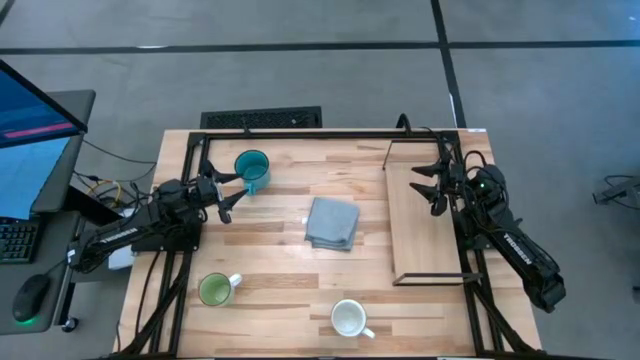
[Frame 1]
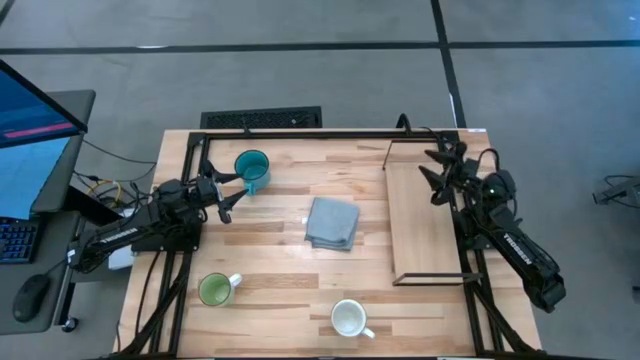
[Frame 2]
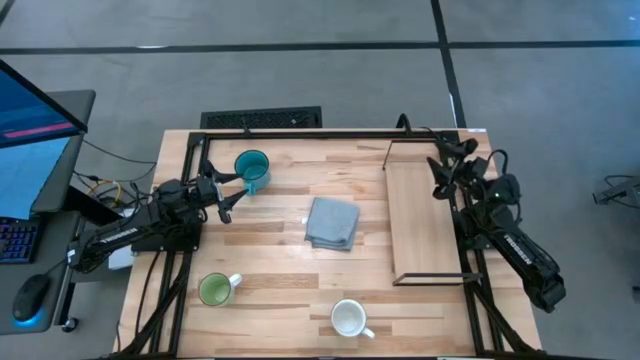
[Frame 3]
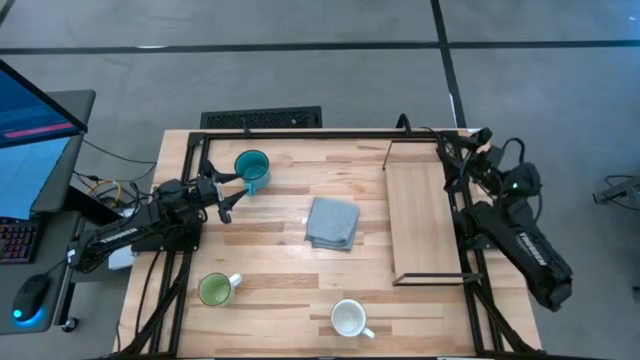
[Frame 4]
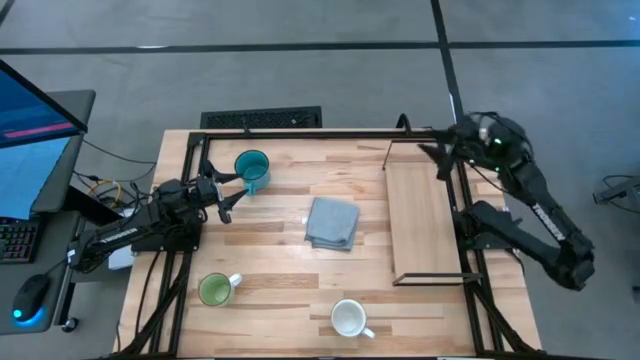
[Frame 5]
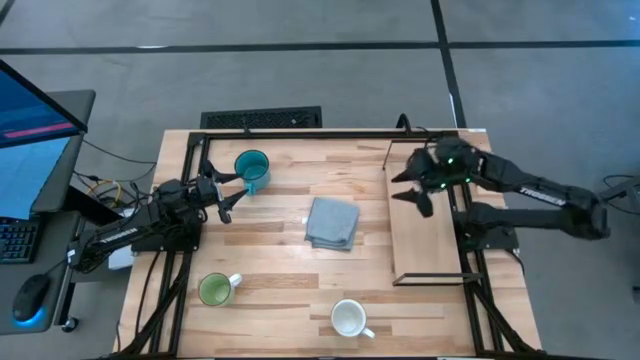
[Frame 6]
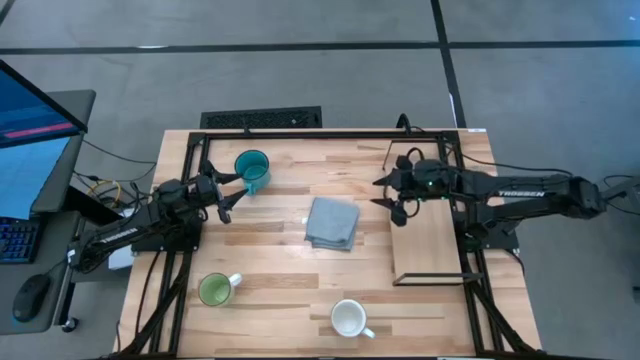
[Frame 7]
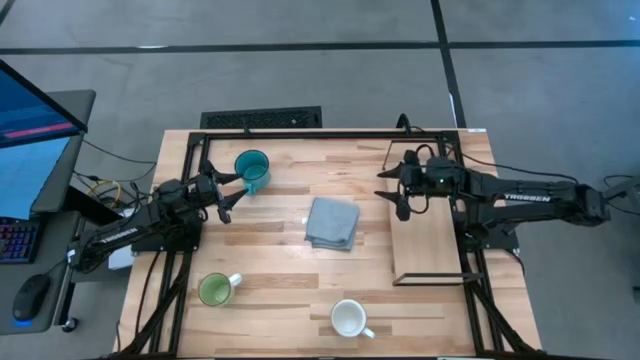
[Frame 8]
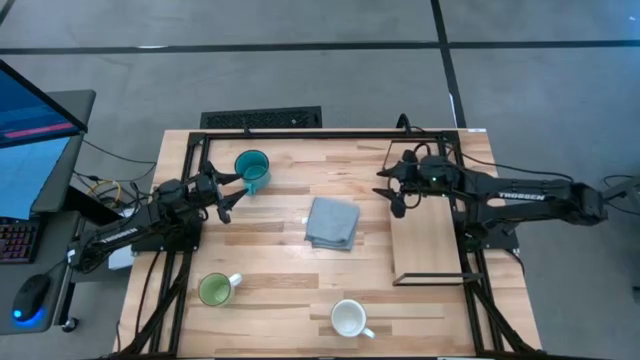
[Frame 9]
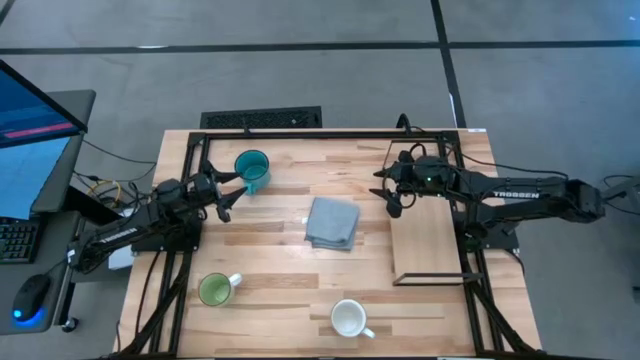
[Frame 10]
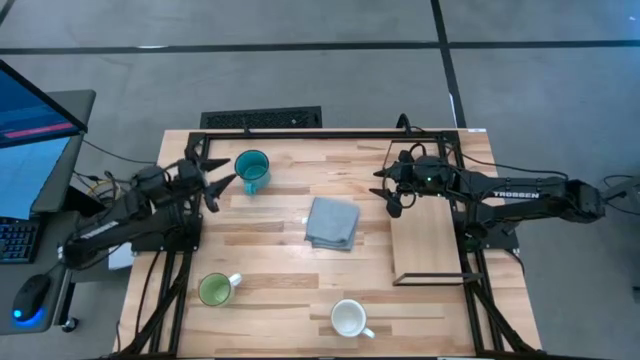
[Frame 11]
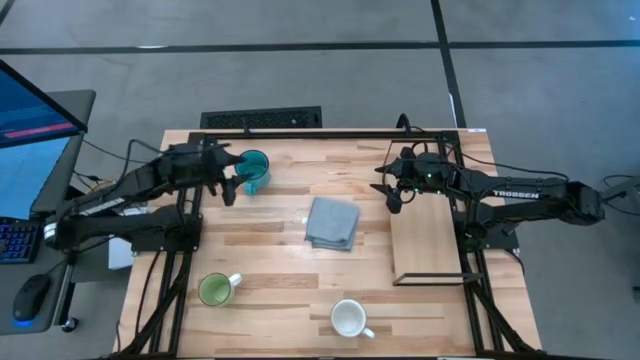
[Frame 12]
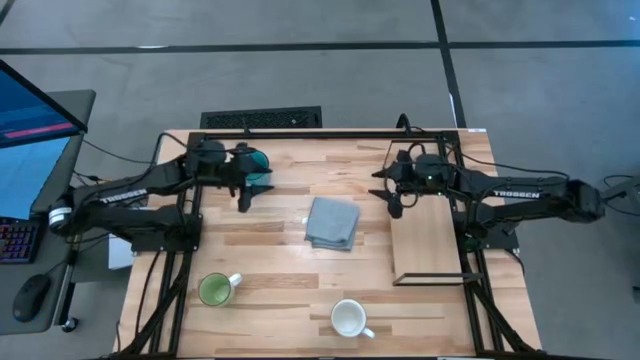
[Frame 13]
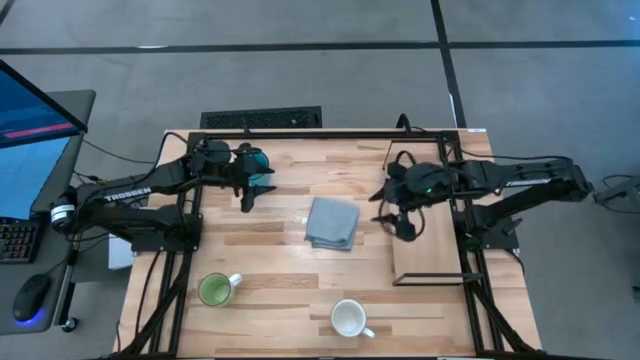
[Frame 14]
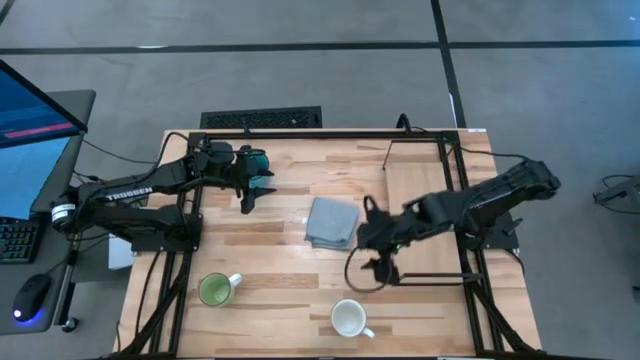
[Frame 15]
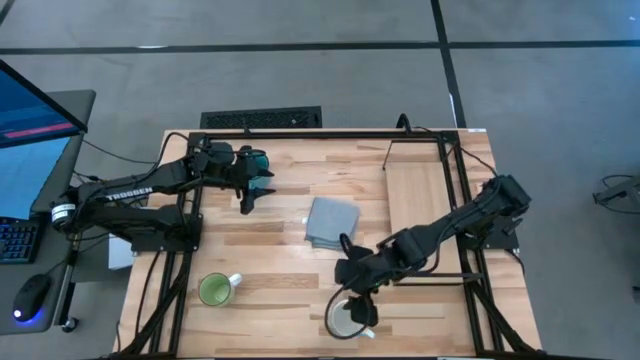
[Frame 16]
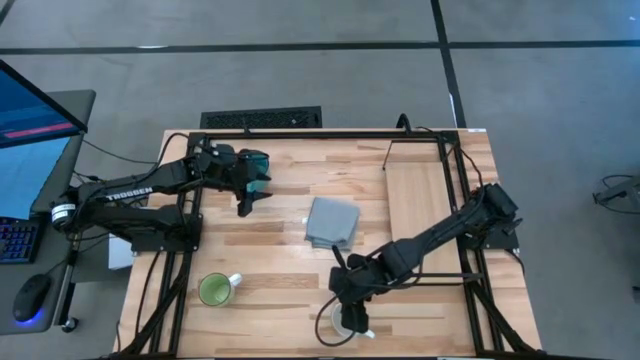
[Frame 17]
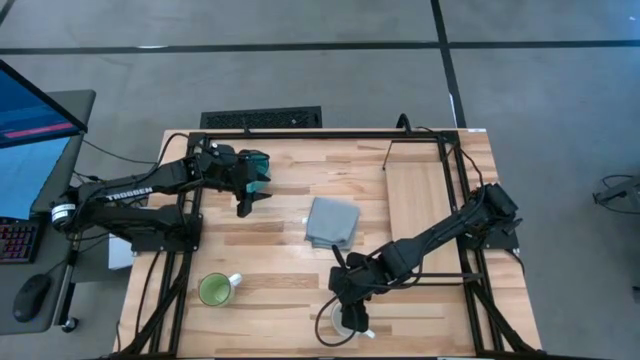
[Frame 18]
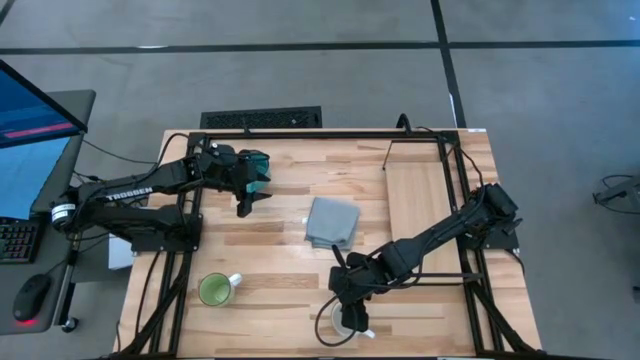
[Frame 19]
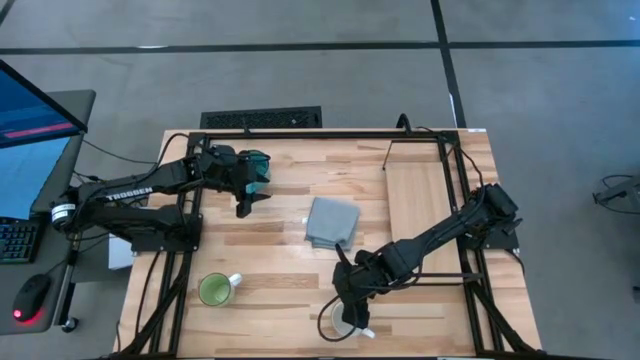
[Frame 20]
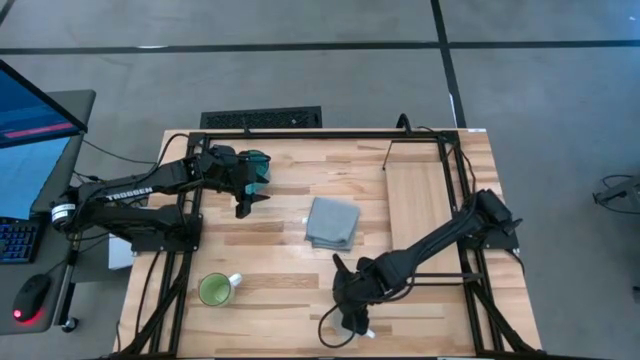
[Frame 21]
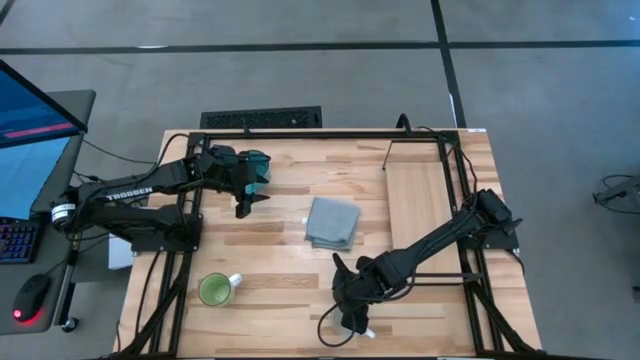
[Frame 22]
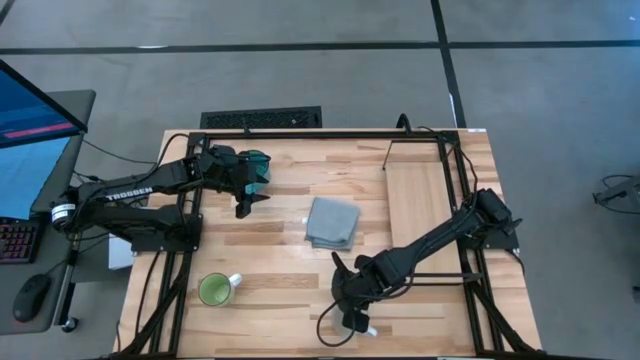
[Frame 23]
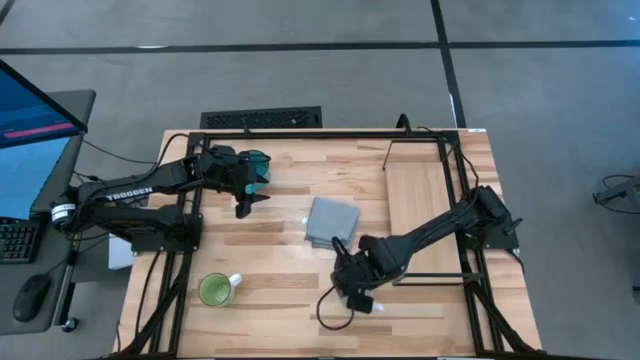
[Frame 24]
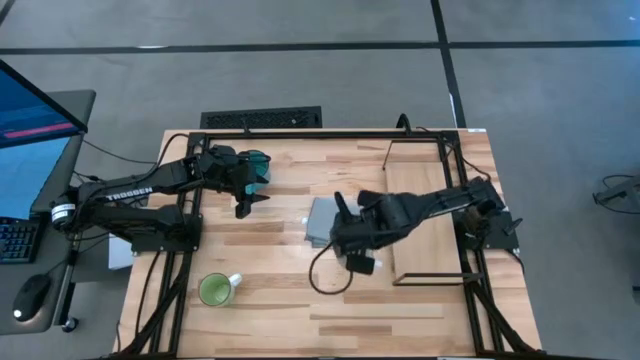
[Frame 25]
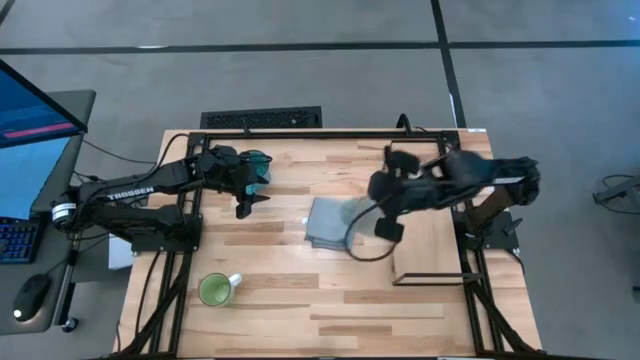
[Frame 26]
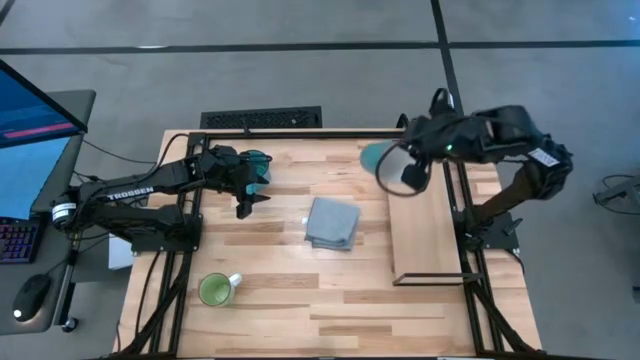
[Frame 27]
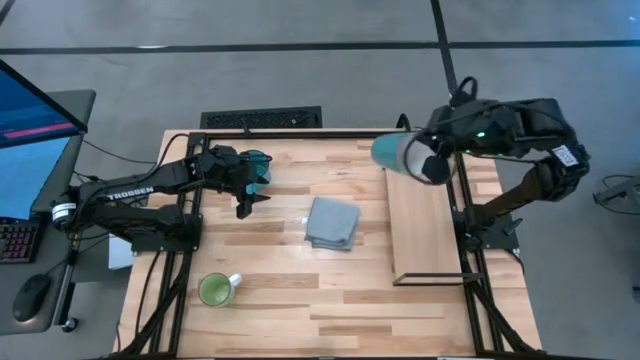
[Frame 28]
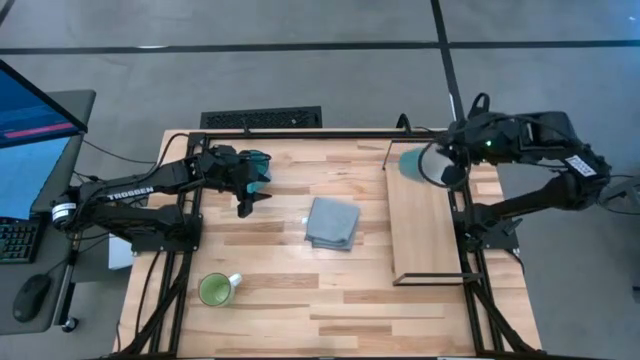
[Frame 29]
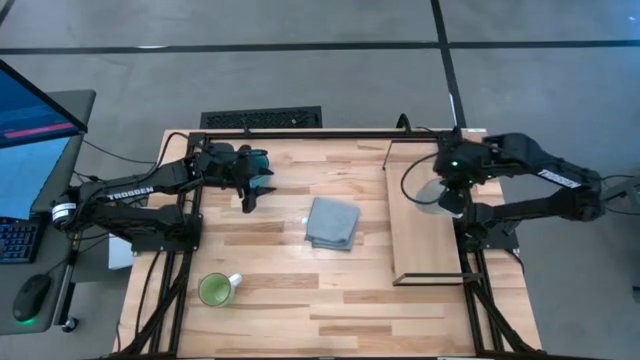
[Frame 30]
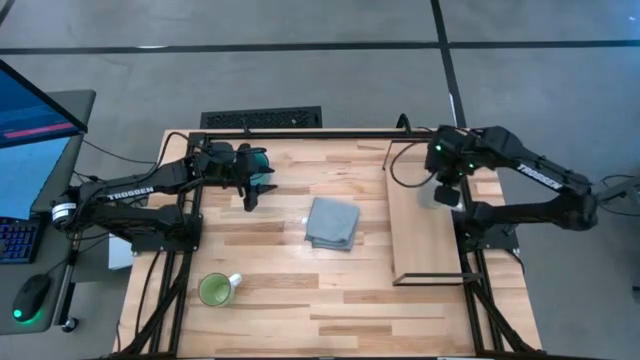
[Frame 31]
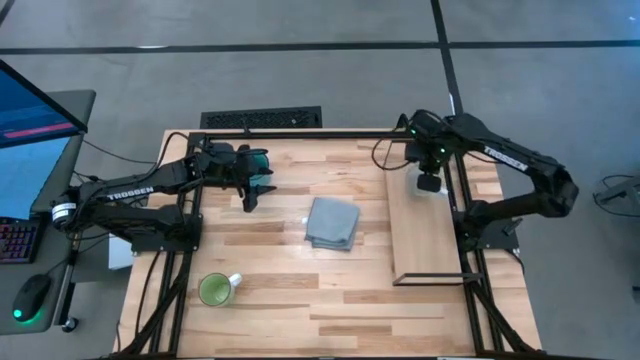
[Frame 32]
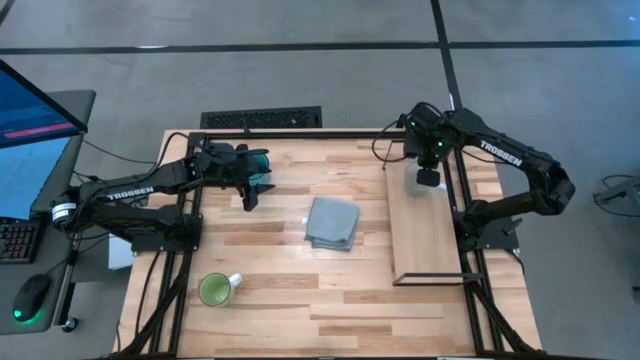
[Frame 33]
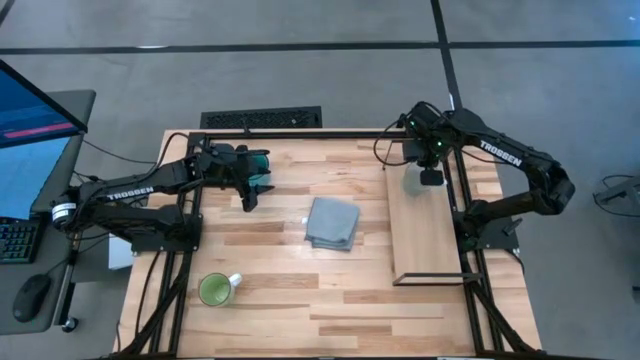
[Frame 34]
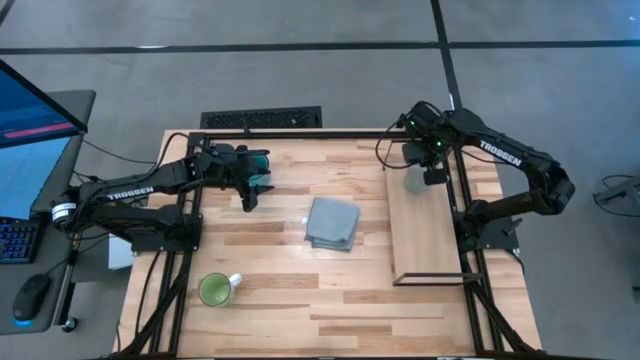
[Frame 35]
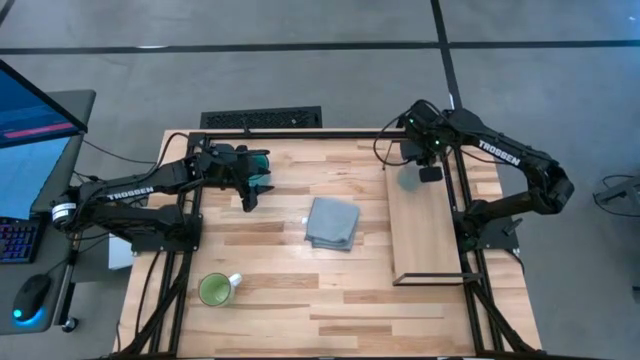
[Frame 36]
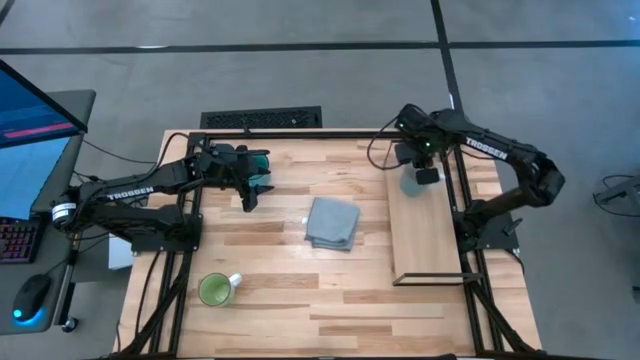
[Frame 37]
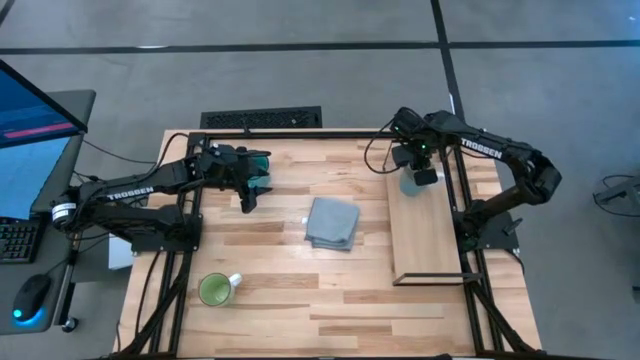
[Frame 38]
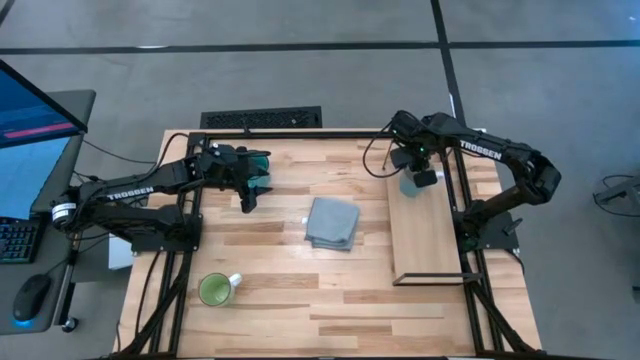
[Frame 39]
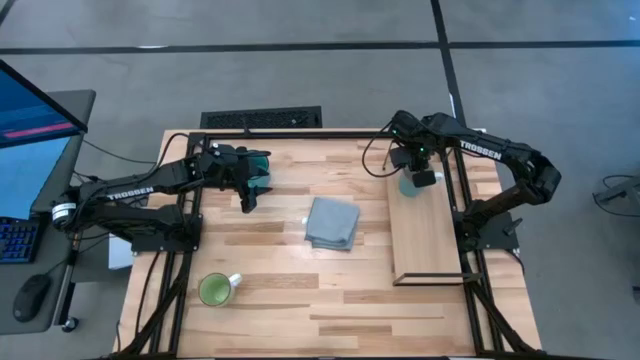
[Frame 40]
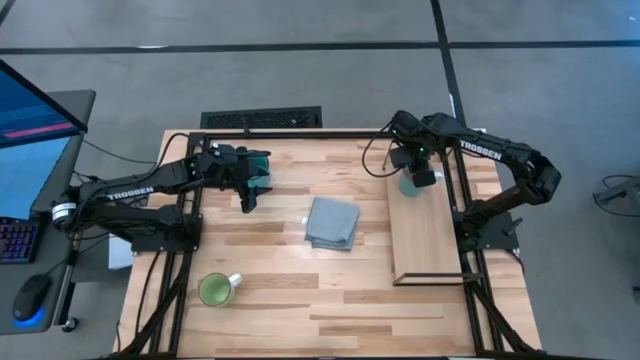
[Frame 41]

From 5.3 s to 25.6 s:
Task: Stack small to large cups/mugs on shelf
Put the mug on the shelf
